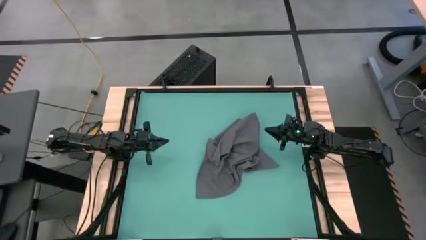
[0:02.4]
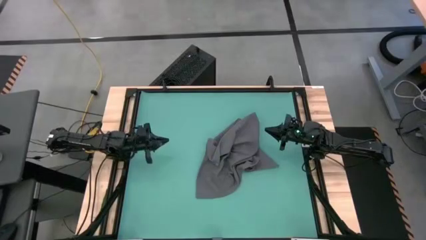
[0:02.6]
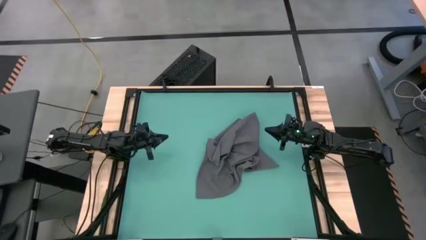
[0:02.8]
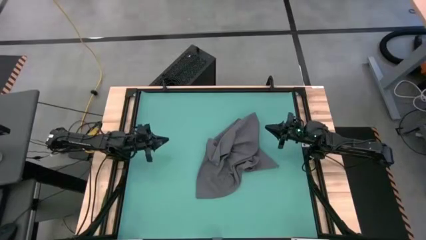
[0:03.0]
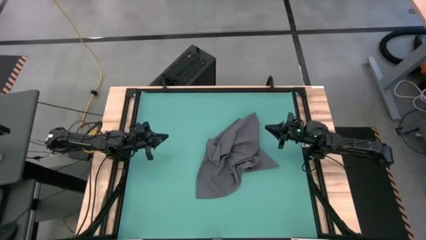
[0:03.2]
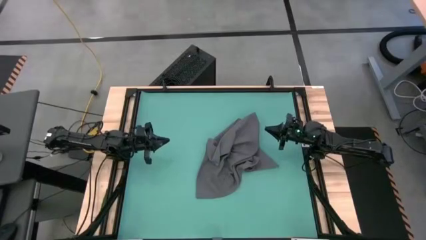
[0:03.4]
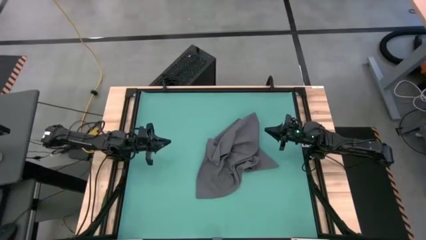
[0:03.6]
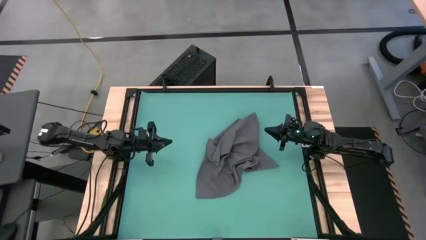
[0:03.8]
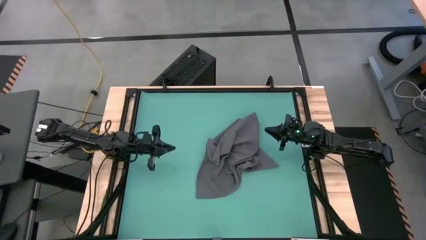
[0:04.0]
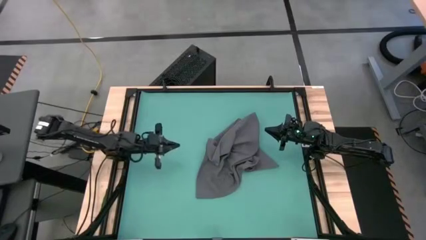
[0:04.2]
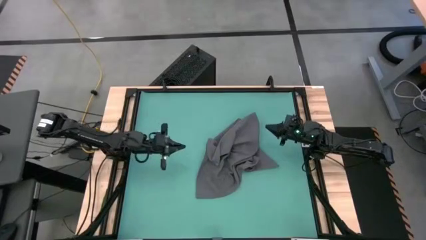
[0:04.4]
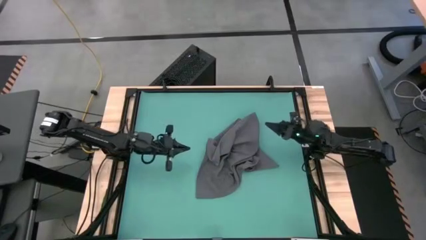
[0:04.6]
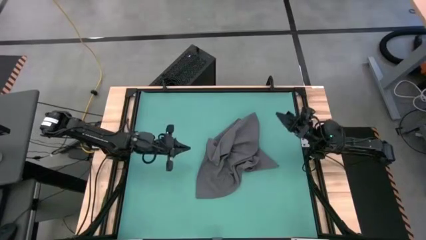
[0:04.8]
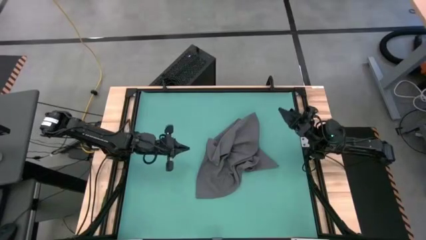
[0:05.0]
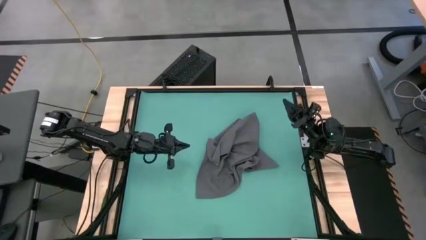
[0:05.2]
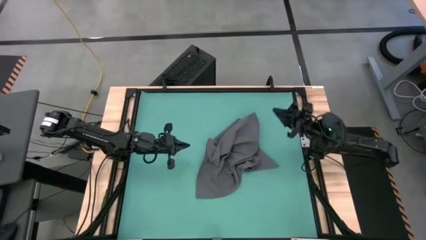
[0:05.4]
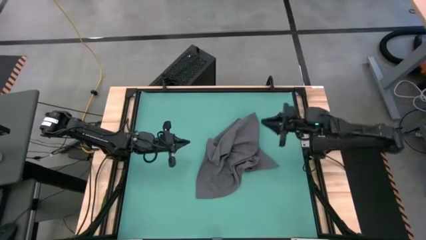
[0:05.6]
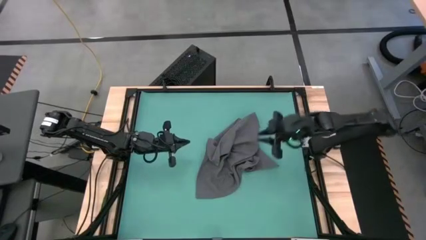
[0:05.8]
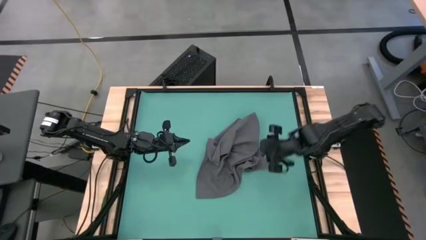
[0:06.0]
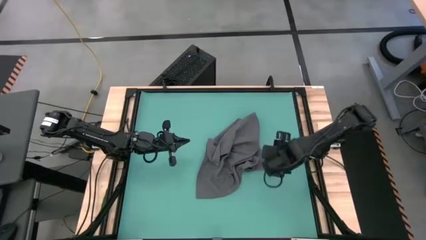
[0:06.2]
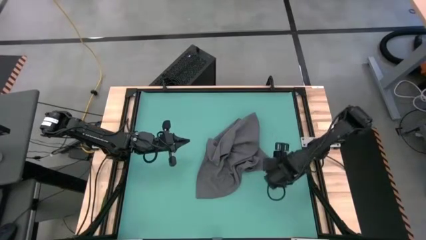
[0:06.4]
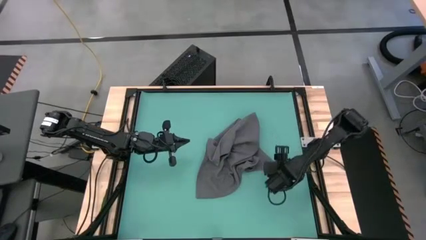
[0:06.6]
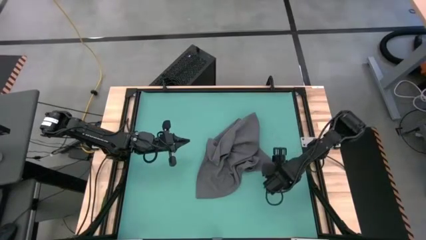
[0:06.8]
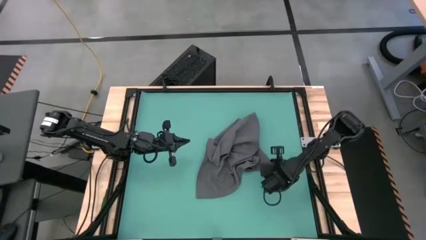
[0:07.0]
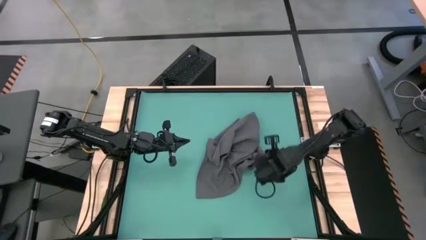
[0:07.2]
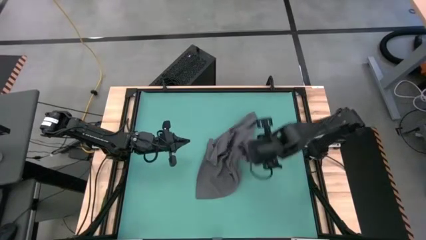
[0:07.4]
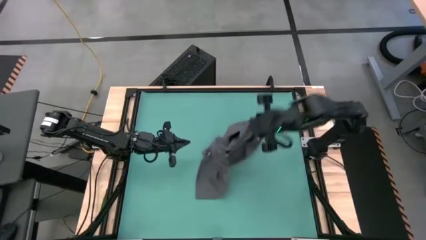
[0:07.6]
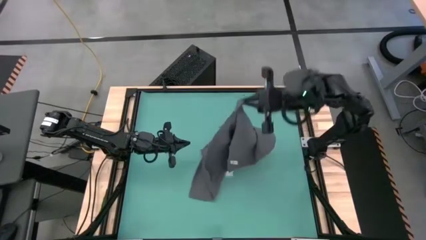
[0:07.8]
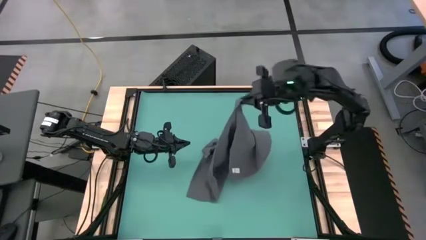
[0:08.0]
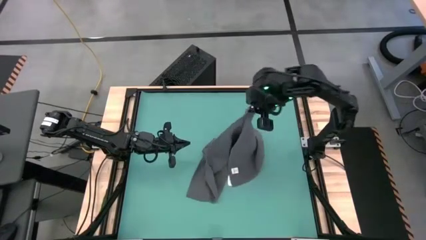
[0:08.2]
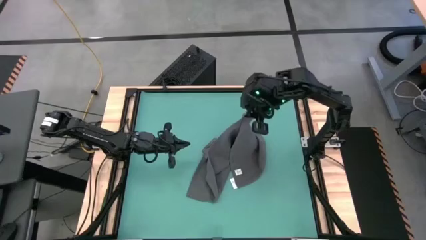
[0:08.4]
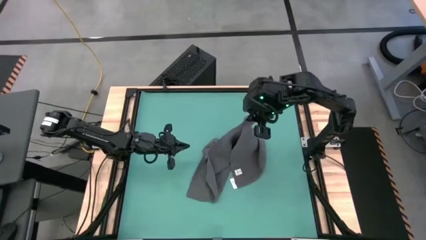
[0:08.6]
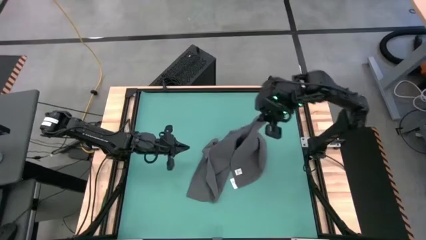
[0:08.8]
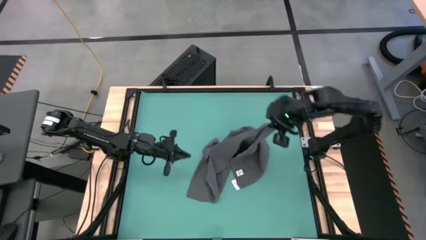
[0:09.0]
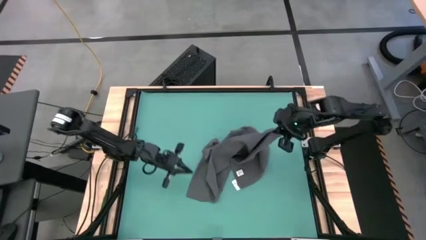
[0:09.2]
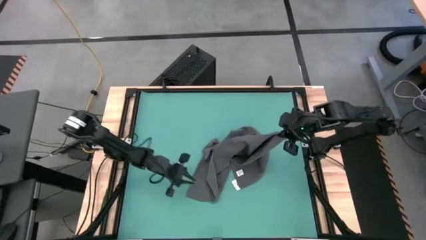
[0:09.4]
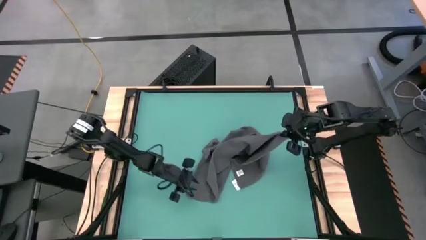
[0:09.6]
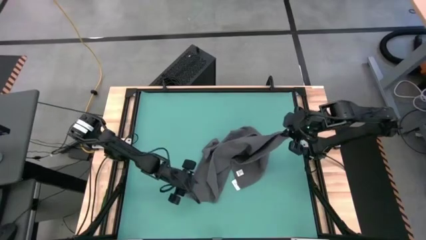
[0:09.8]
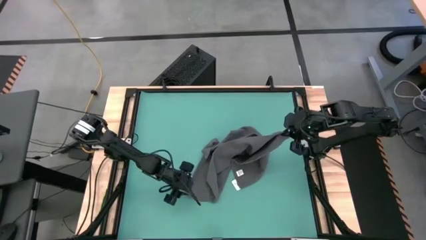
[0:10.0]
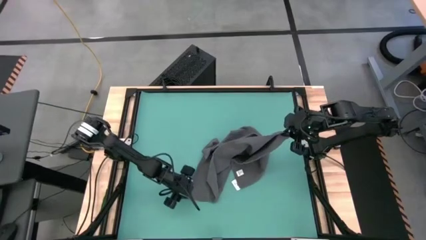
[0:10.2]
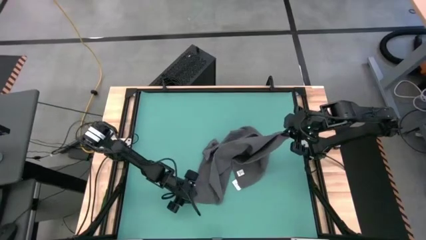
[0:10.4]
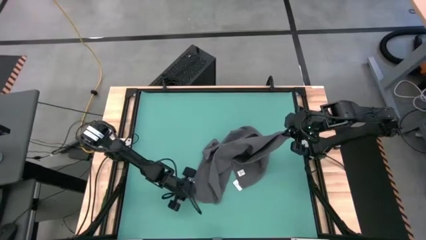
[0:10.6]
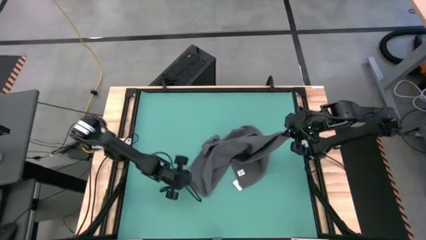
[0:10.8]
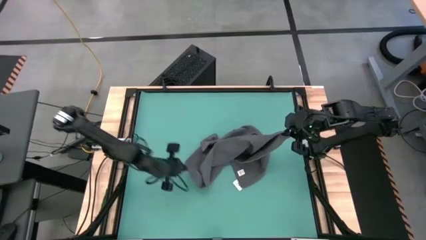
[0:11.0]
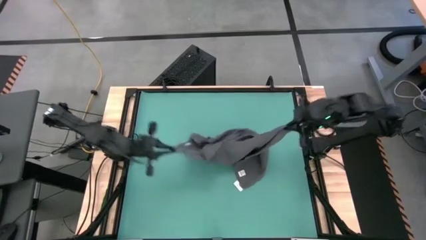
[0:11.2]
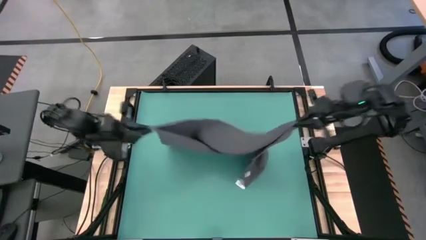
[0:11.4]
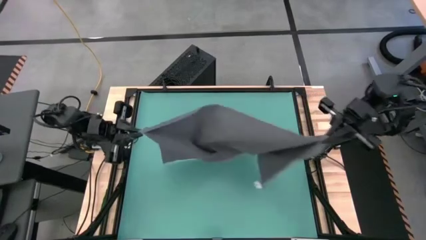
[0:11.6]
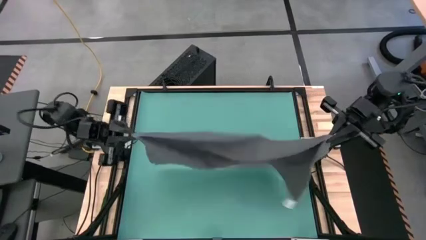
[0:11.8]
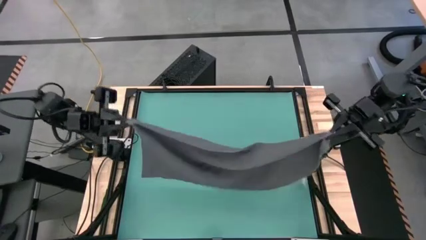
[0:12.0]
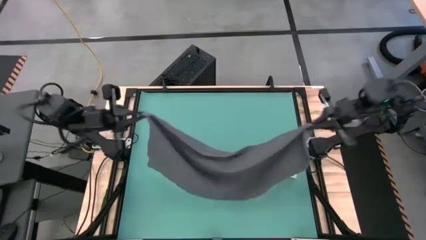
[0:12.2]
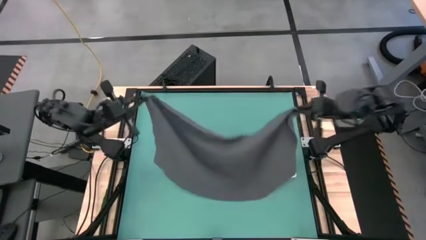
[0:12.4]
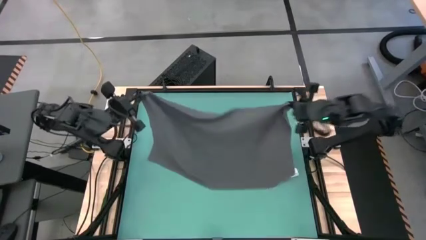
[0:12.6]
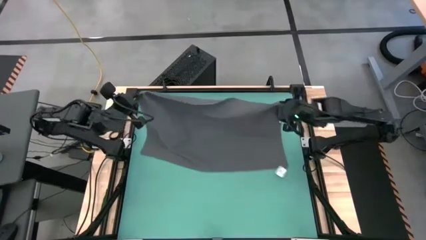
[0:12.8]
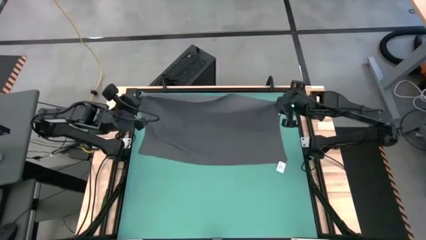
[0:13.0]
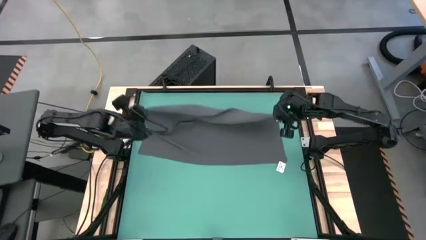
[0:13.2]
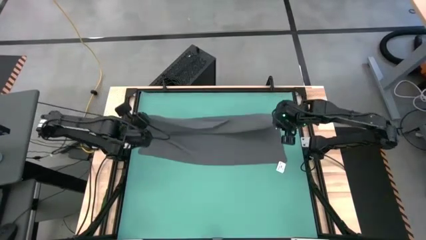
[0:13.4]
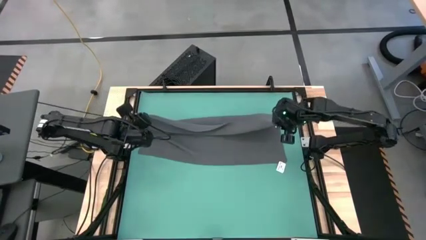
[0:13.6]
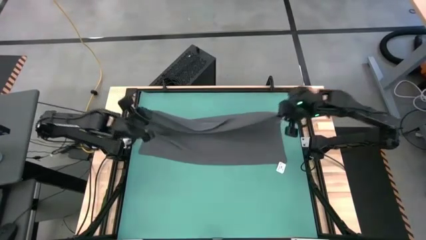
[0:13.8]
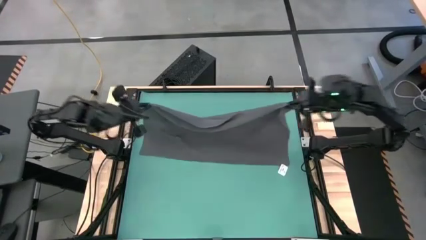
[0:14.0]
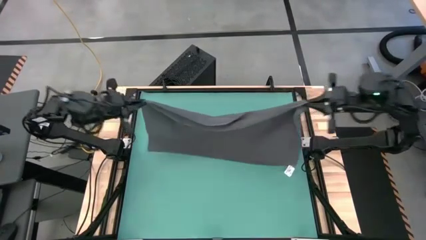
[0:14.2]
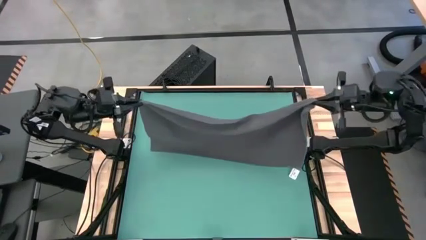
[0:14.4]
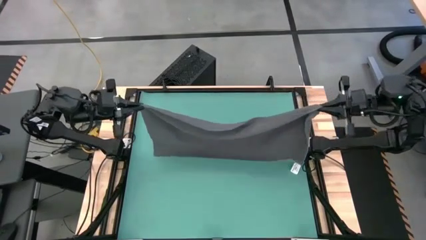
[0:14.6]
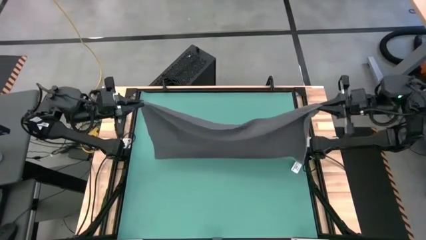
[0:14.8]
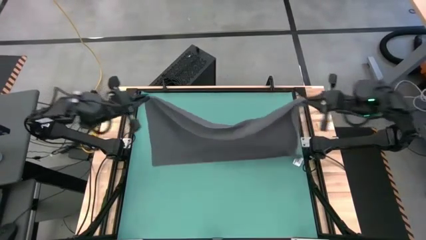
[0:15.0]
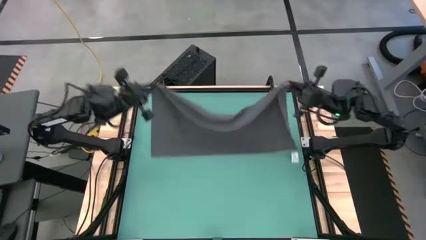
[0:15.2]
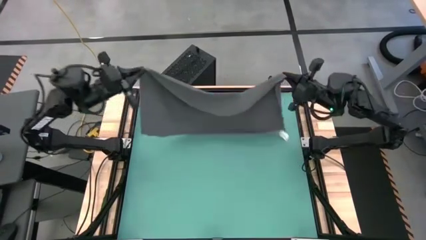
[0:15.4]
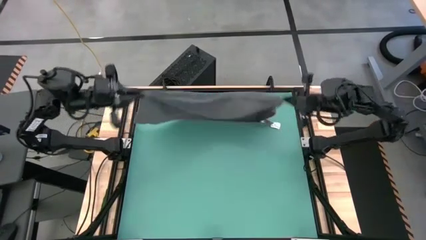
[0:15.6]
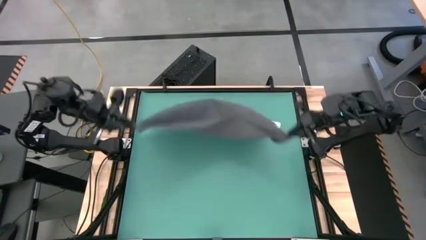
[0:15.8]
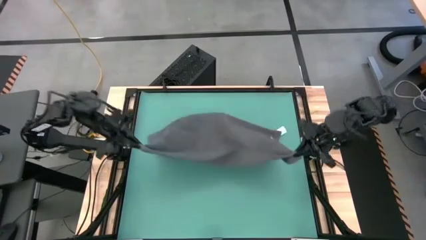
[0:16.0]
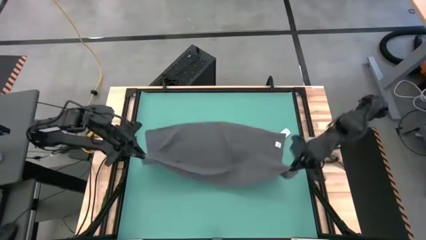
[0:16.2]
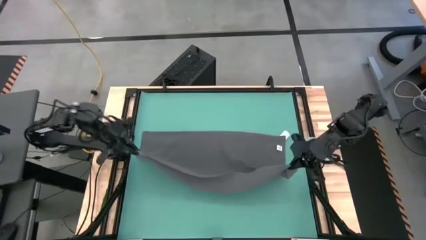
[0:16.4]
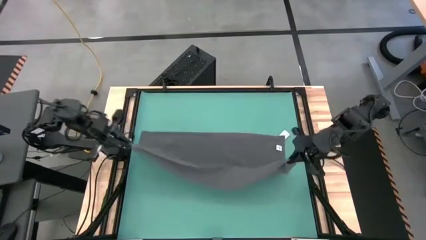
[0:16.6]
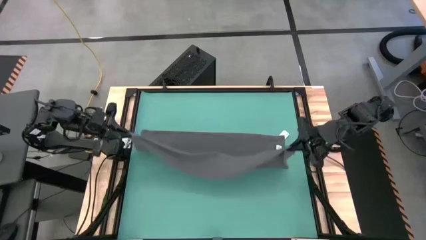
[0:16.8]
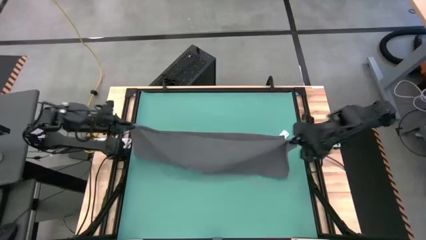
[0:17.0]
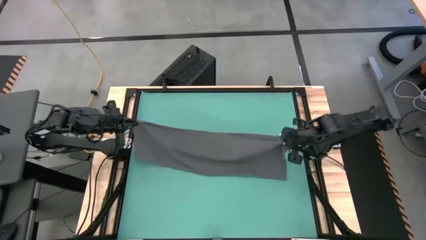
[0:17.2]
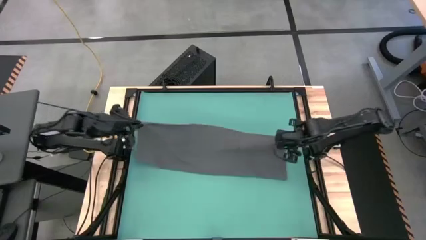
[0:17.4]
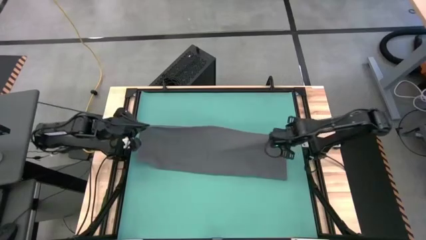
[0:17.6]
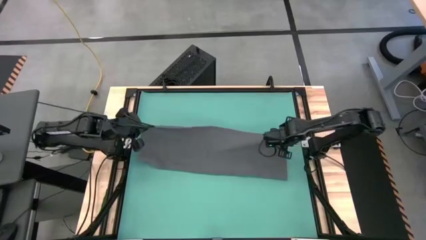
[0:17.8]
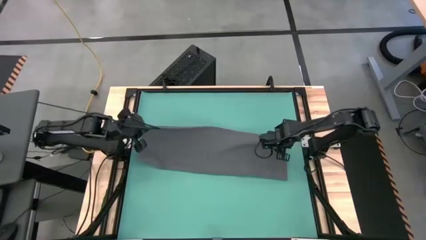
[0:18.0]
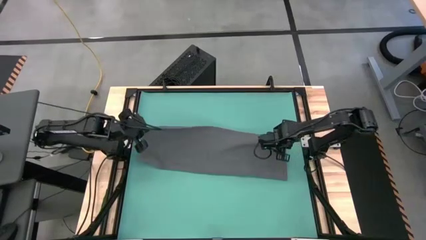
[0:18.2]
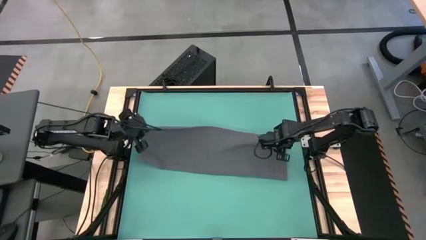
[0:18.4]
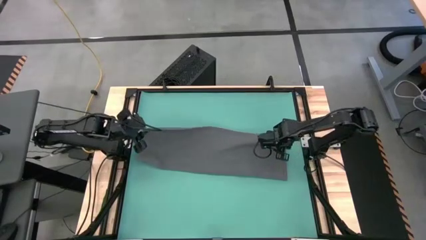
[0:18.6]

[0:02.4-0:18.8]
Task: Roll towel into tight, uniform cylinder
Fold the gray towel
